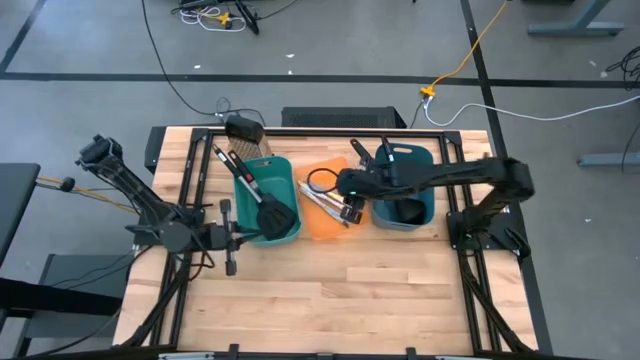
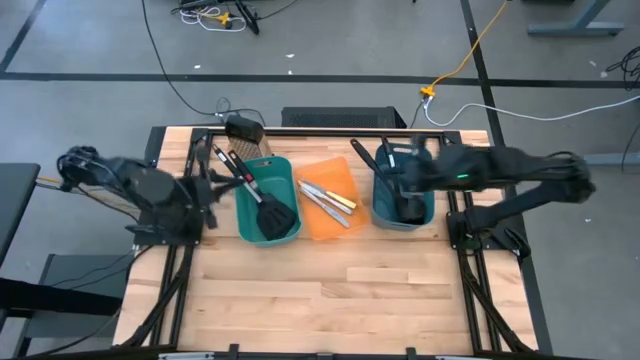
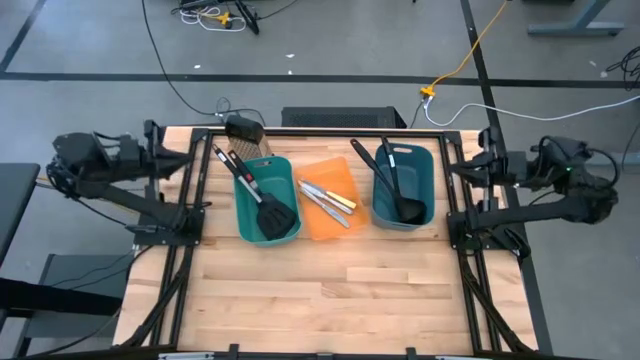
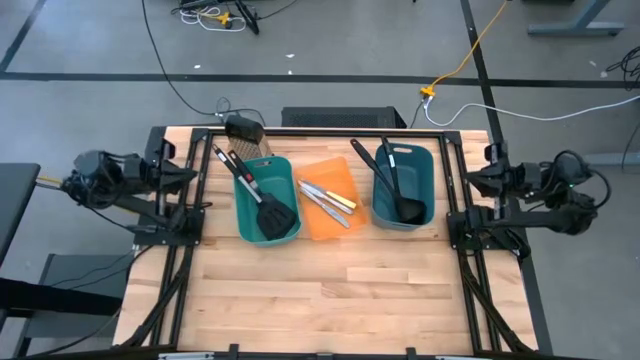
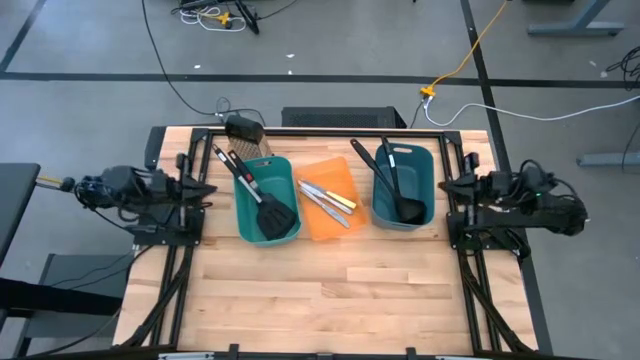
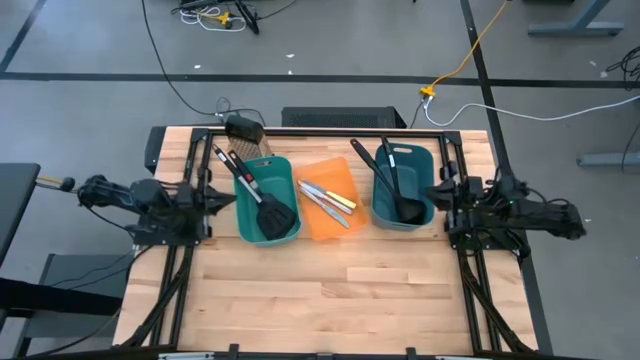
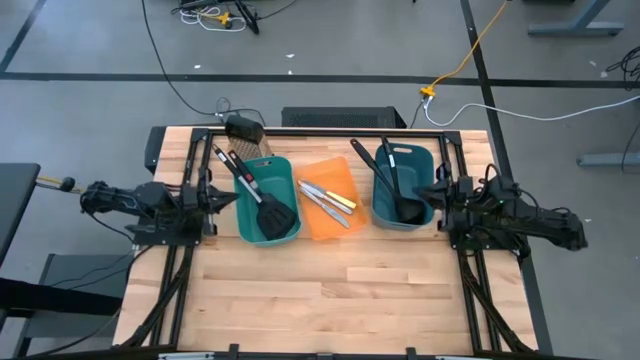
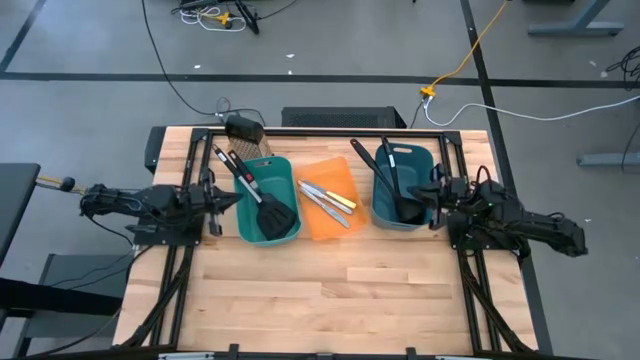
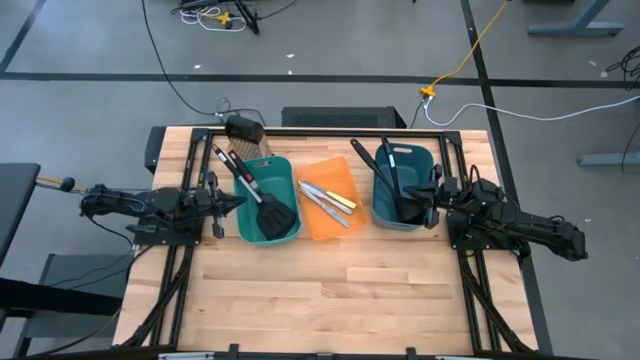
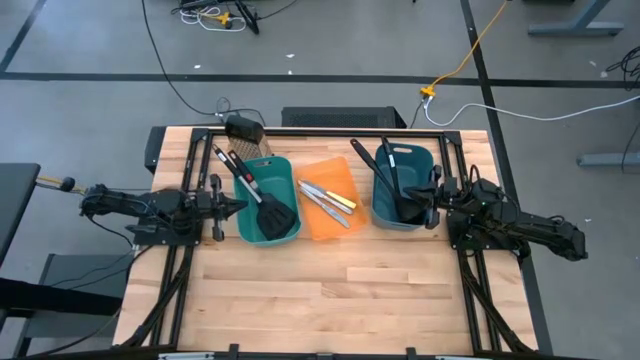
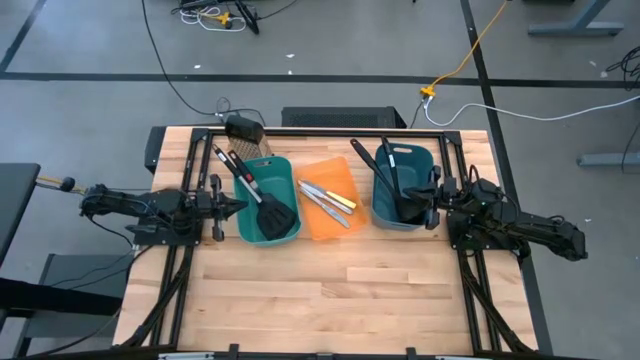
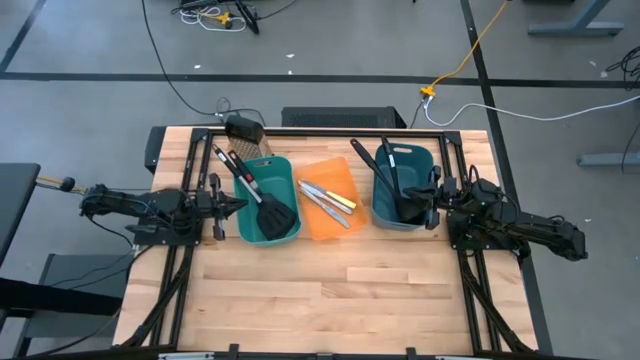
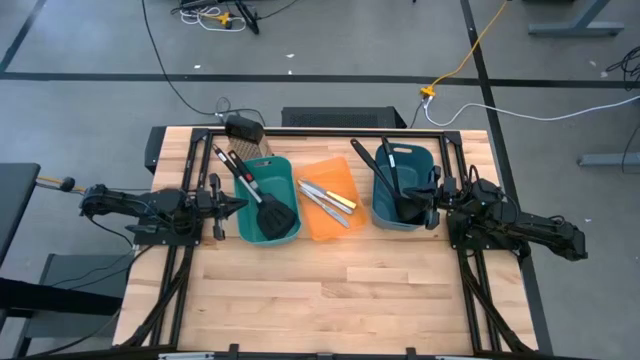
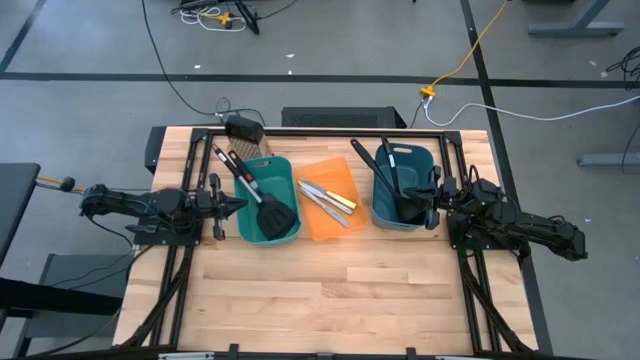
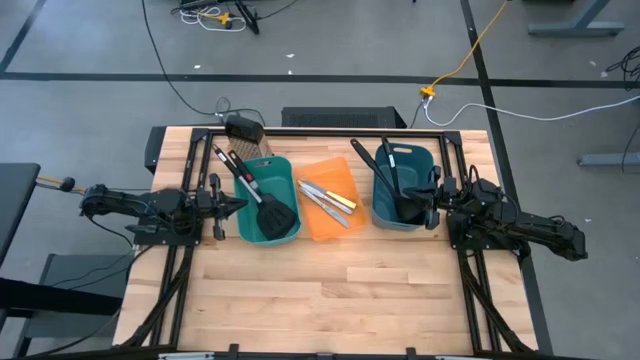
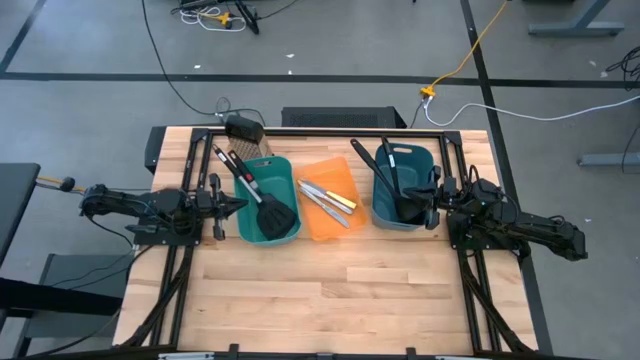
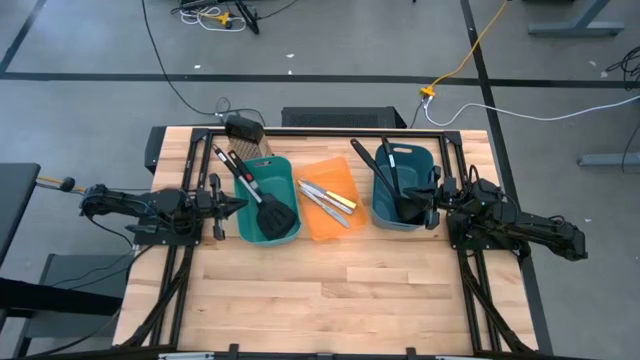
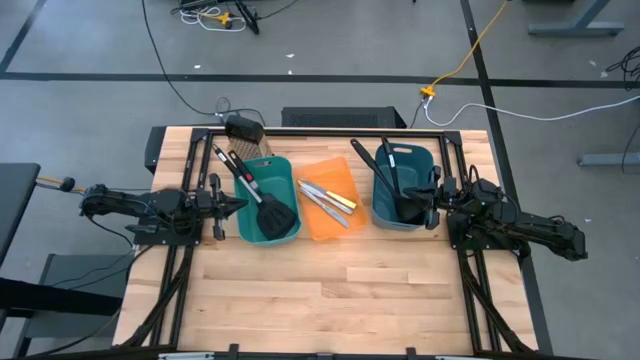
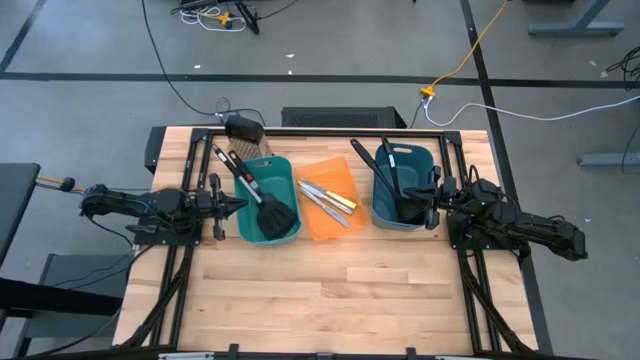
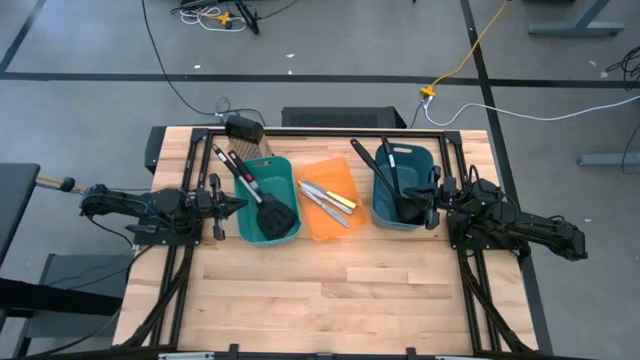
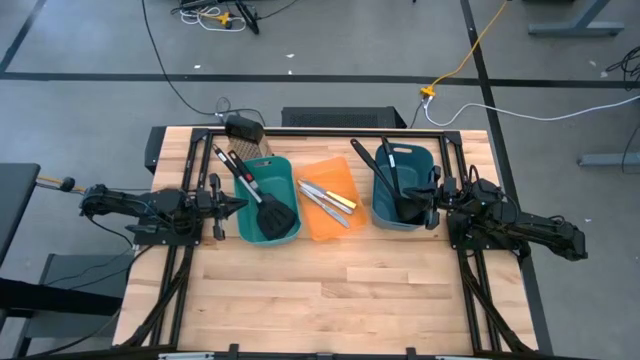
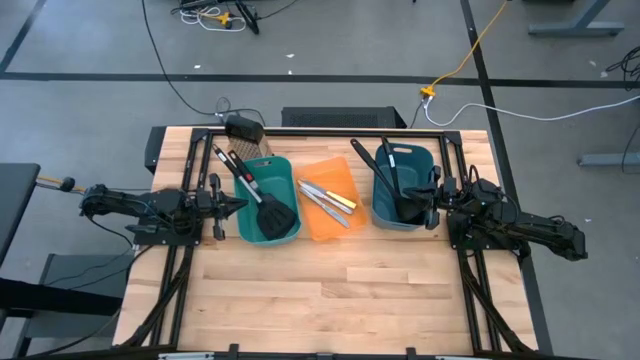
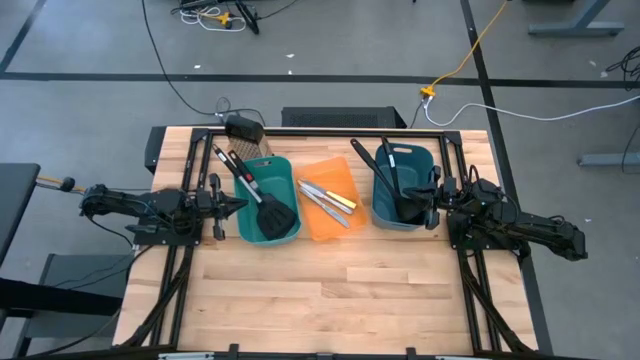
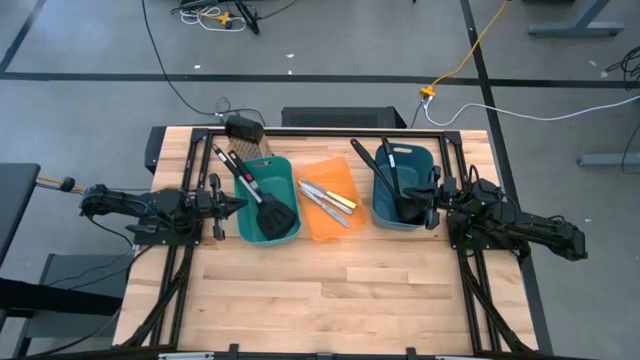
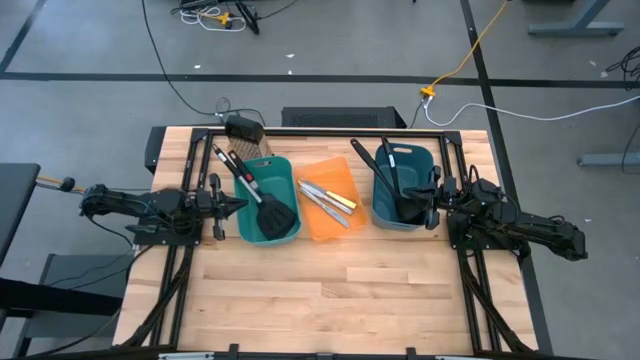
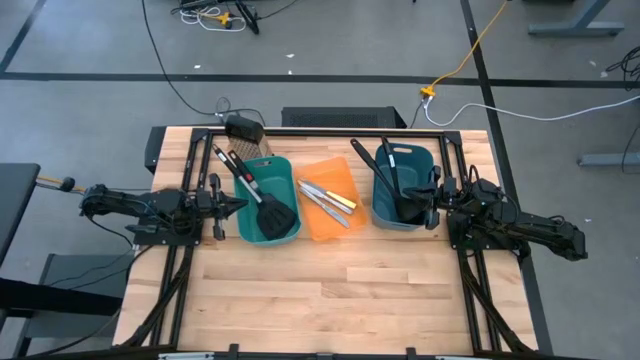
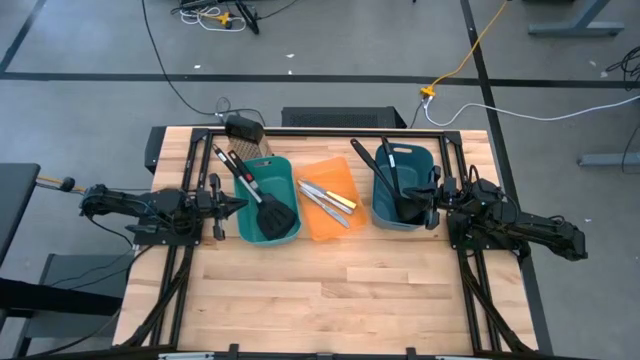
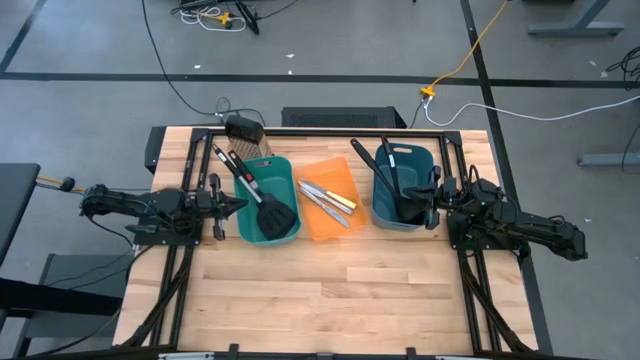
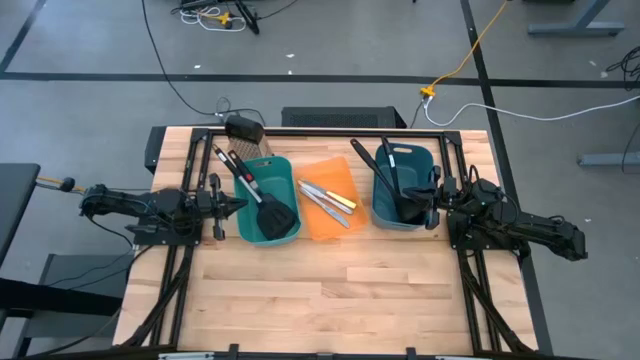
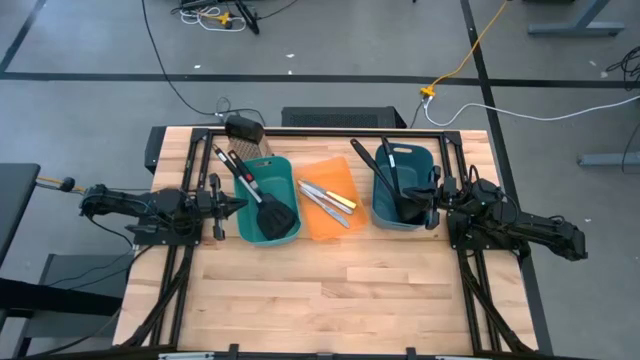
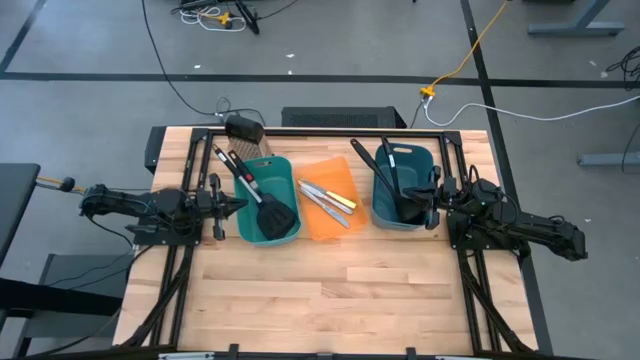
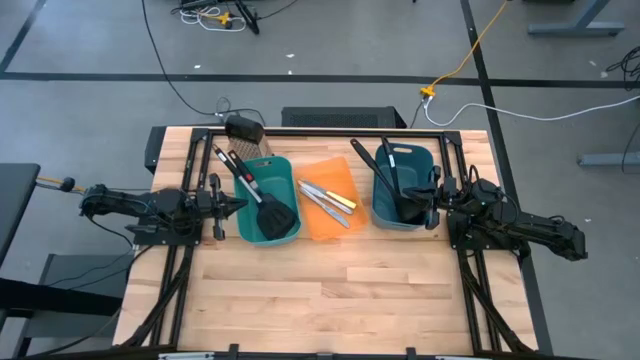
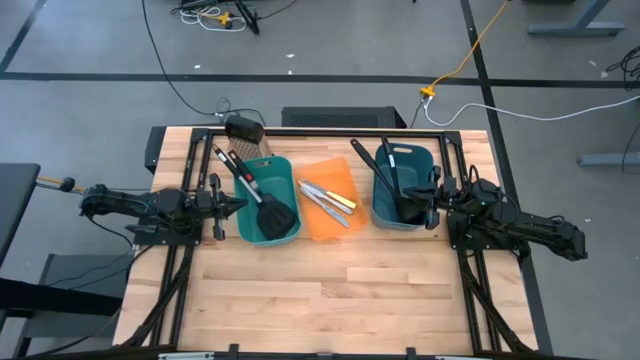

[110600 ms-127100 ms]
Task: Pick & Place Kitchen Items
Return to Home Position

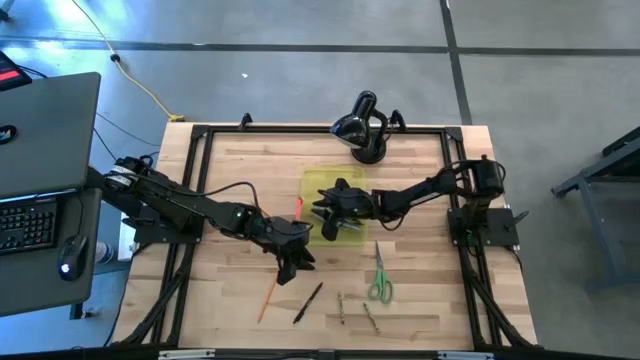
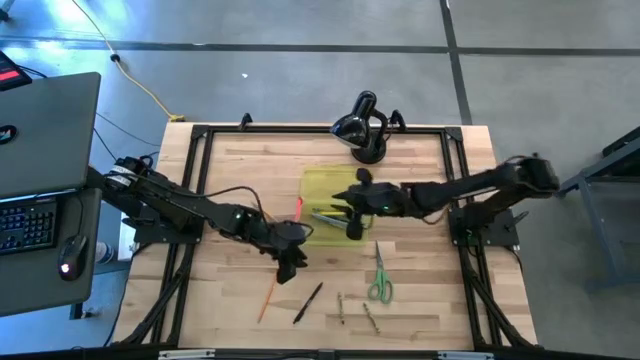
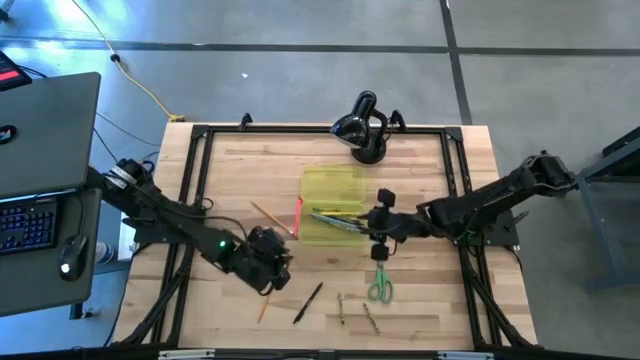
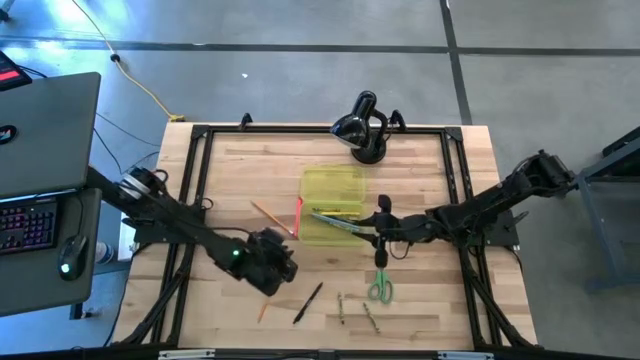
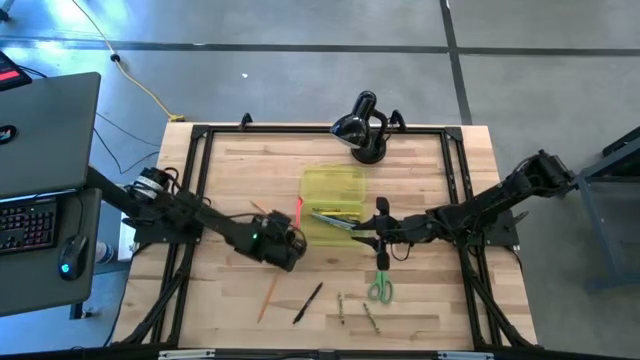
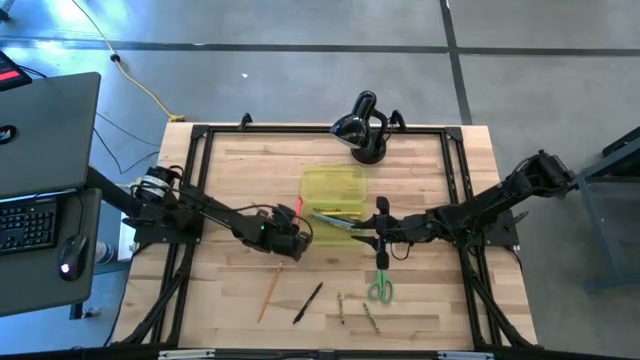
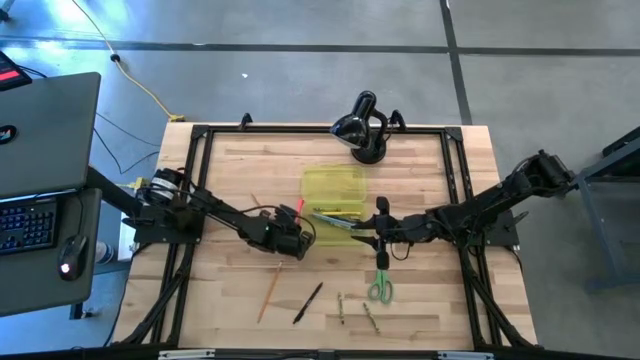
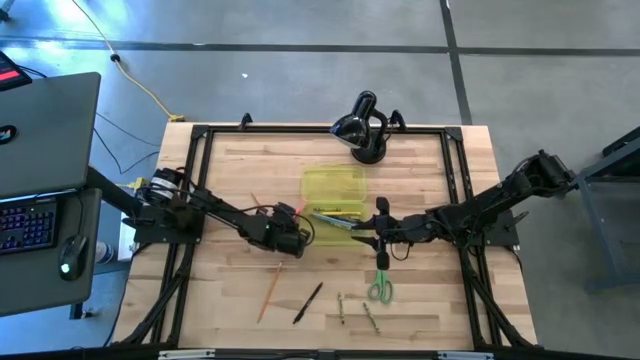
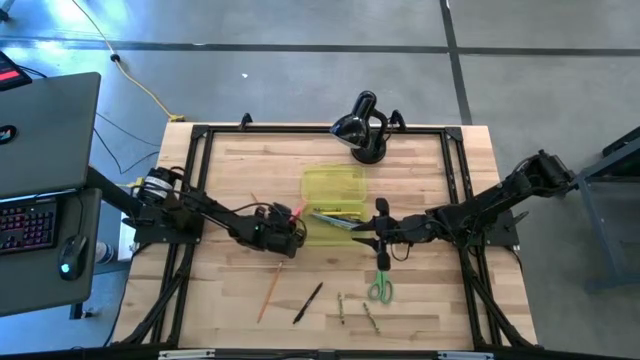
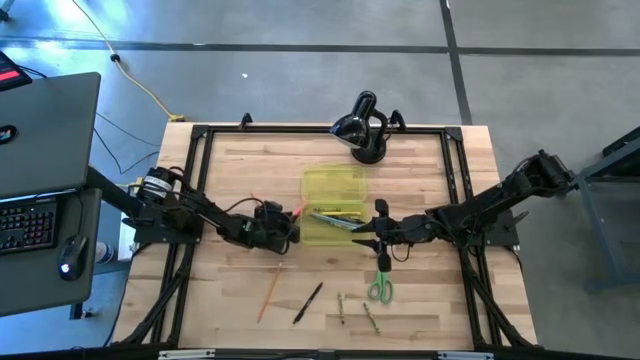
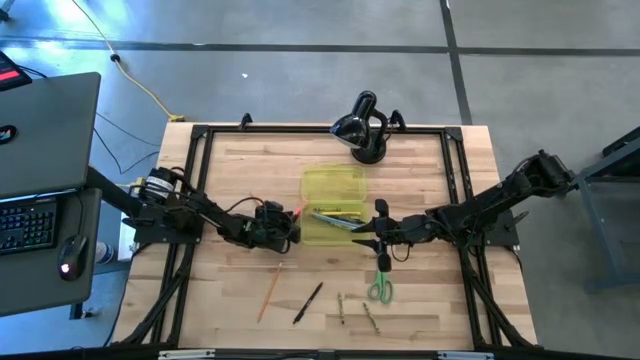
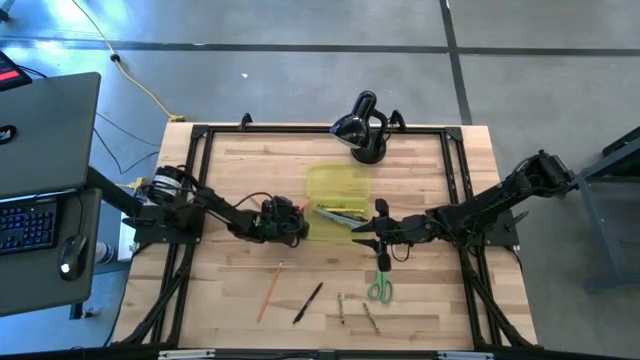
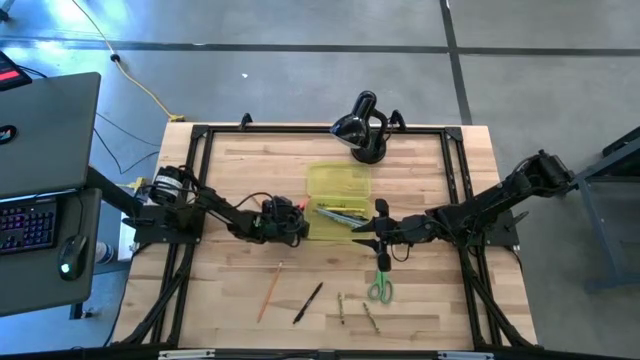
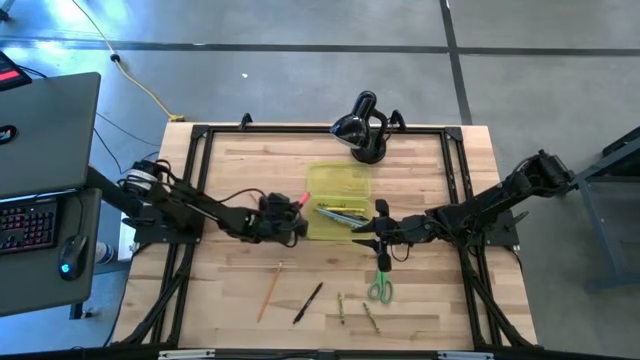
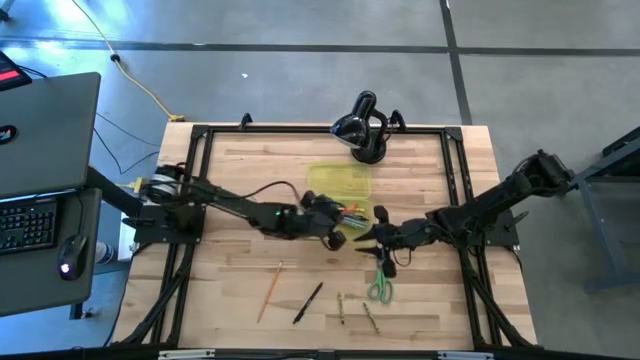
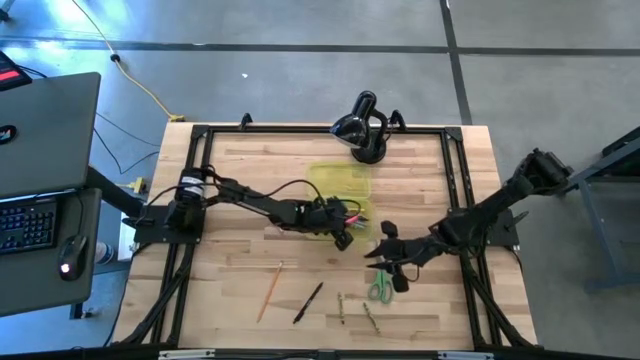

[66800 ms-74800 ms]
Task: Pick & place school supplies into a supply box
Put the pink pen into the yellow school supply box
